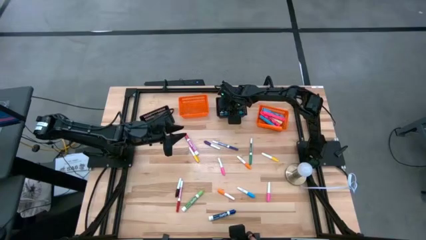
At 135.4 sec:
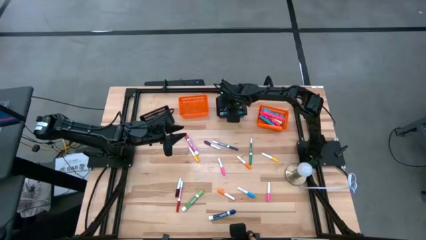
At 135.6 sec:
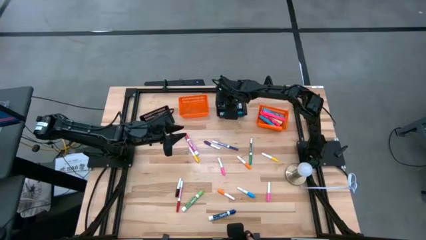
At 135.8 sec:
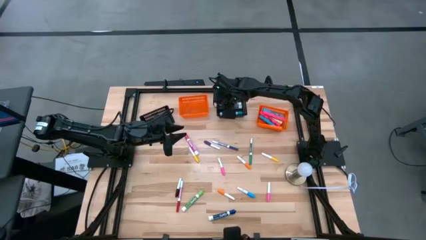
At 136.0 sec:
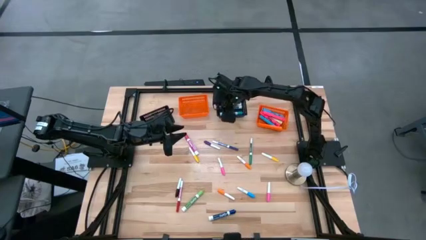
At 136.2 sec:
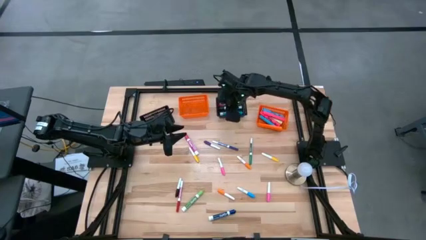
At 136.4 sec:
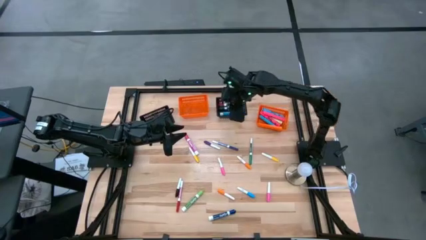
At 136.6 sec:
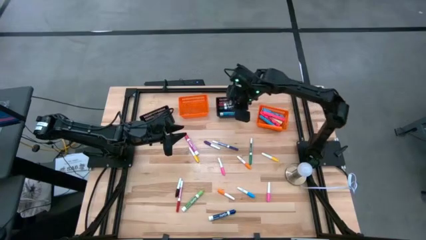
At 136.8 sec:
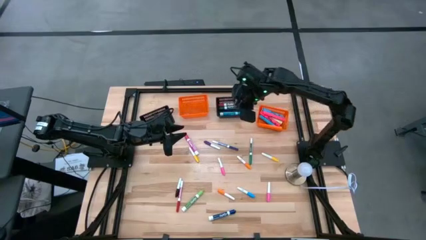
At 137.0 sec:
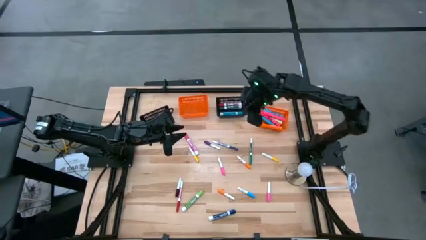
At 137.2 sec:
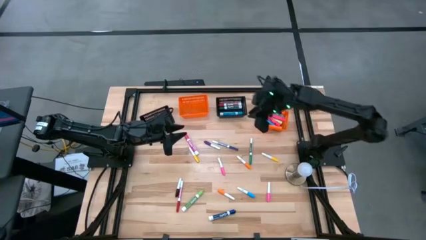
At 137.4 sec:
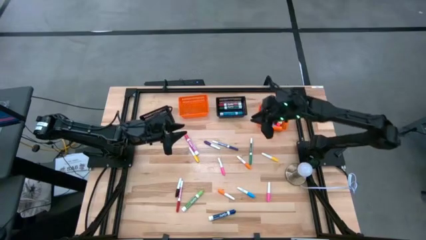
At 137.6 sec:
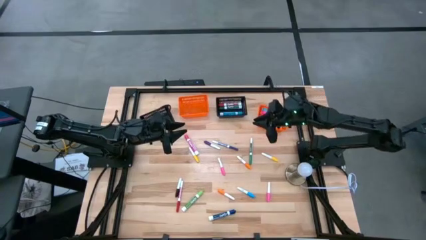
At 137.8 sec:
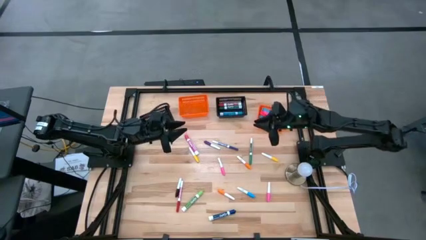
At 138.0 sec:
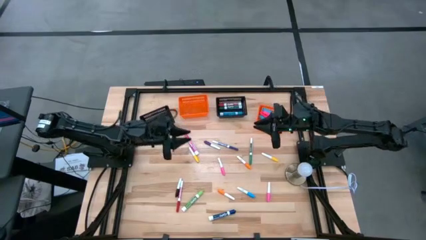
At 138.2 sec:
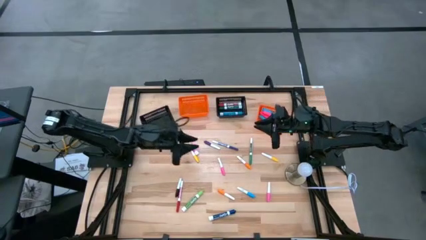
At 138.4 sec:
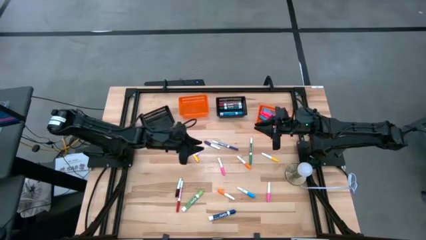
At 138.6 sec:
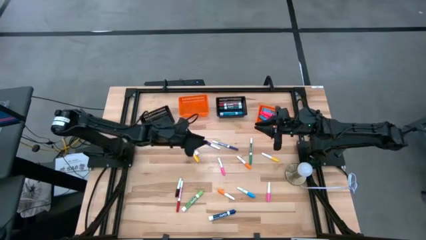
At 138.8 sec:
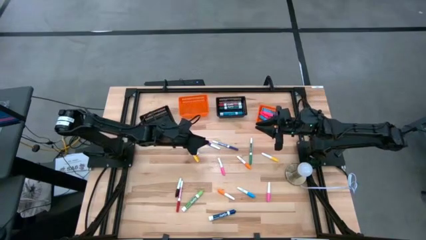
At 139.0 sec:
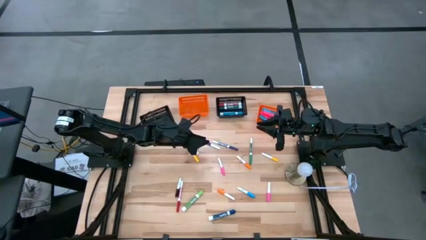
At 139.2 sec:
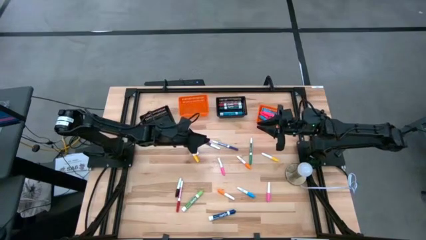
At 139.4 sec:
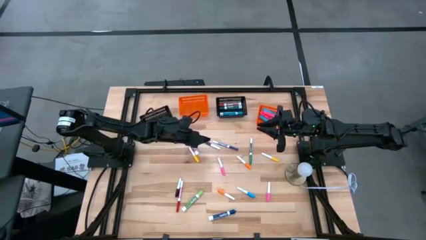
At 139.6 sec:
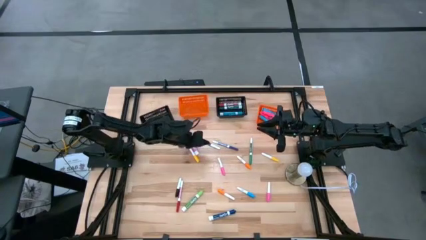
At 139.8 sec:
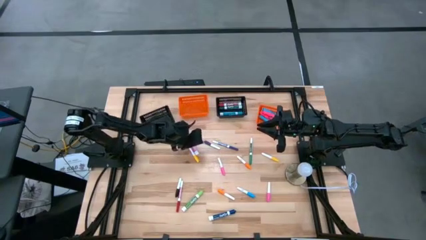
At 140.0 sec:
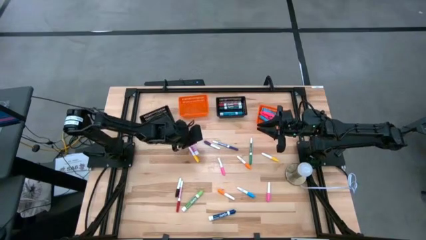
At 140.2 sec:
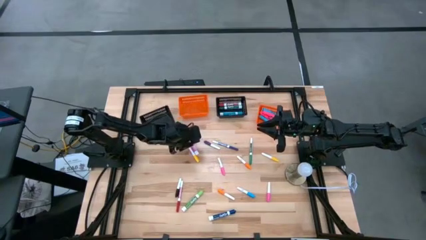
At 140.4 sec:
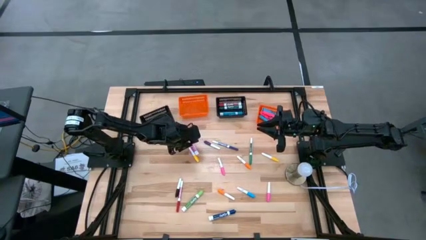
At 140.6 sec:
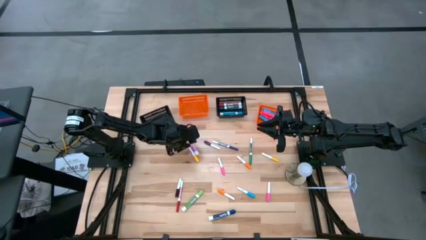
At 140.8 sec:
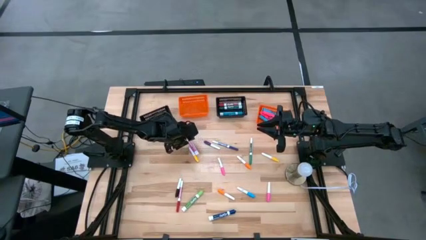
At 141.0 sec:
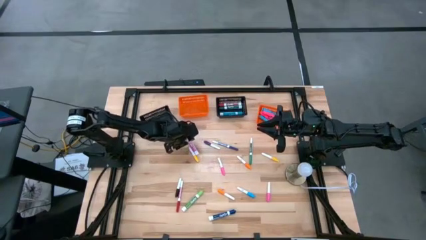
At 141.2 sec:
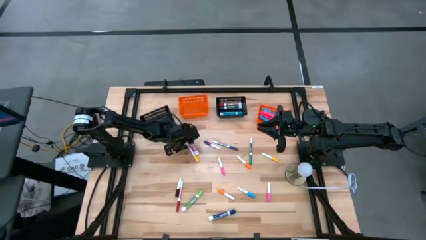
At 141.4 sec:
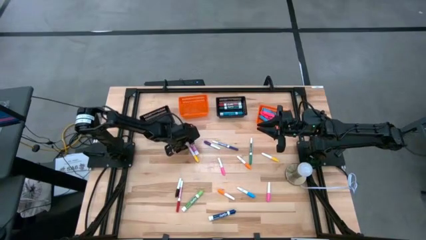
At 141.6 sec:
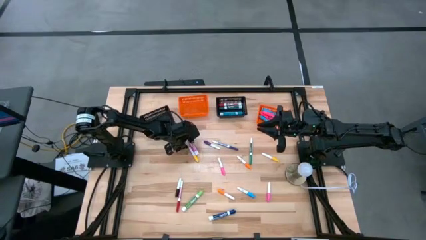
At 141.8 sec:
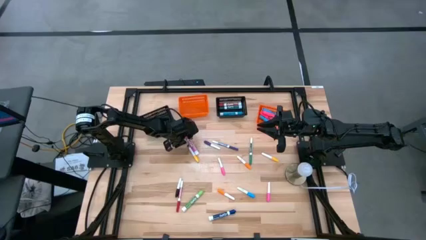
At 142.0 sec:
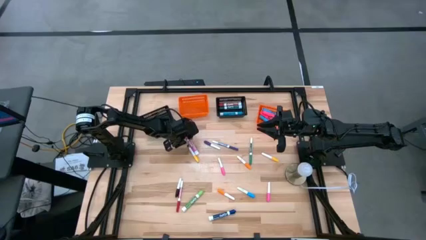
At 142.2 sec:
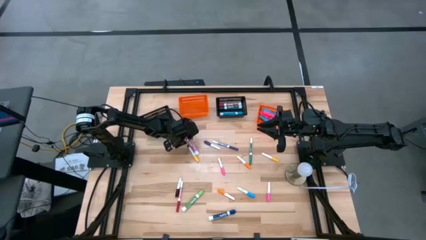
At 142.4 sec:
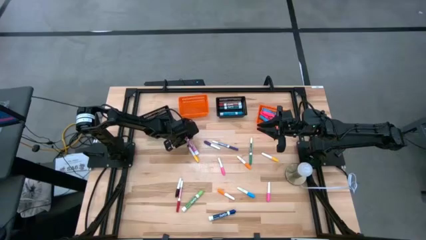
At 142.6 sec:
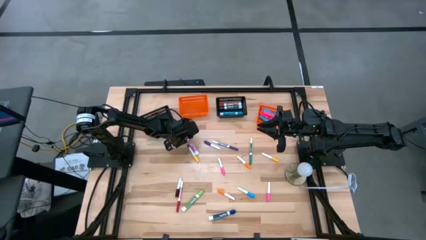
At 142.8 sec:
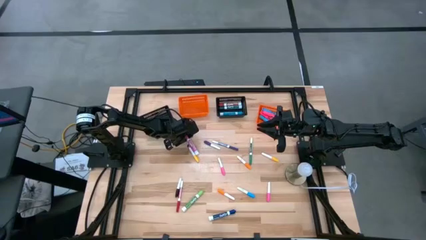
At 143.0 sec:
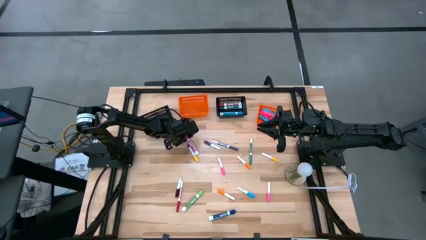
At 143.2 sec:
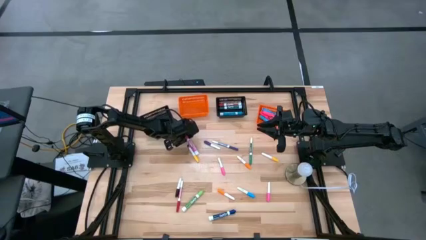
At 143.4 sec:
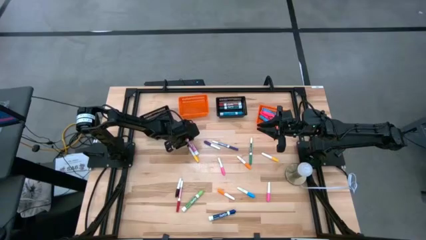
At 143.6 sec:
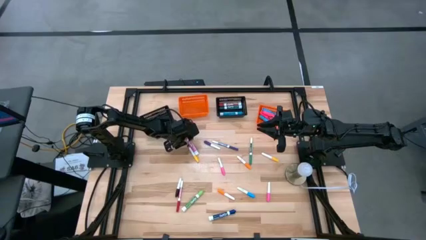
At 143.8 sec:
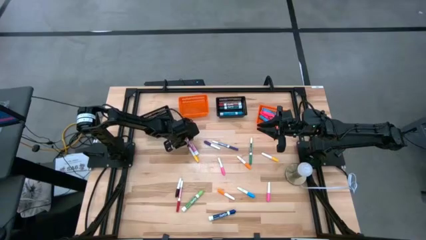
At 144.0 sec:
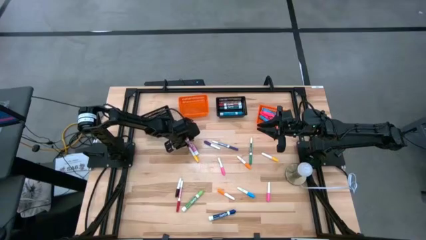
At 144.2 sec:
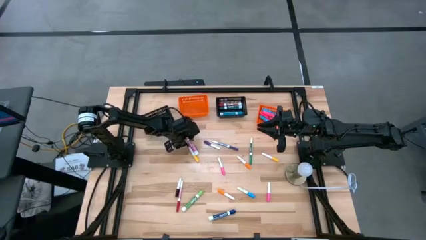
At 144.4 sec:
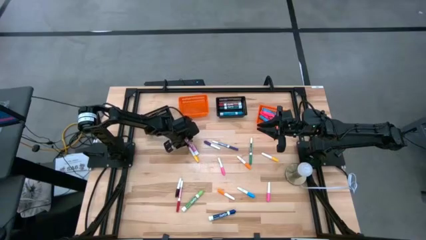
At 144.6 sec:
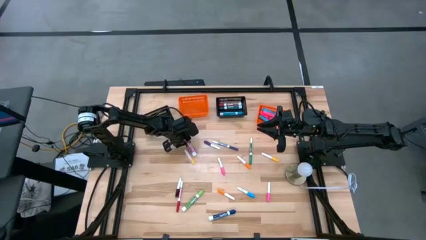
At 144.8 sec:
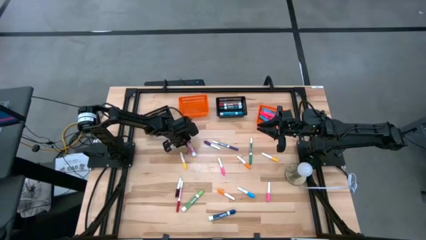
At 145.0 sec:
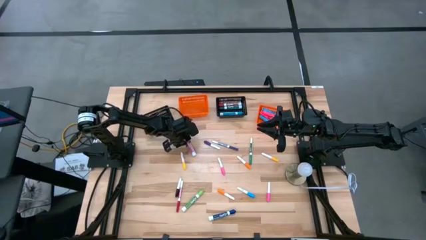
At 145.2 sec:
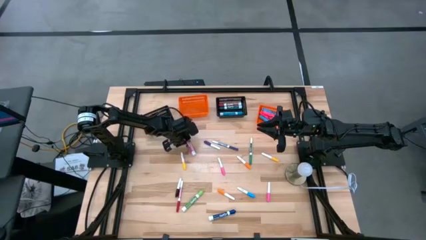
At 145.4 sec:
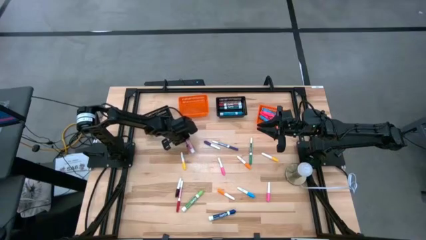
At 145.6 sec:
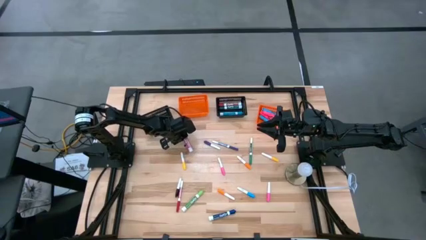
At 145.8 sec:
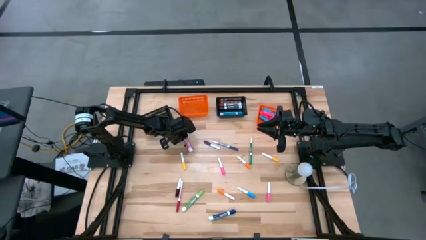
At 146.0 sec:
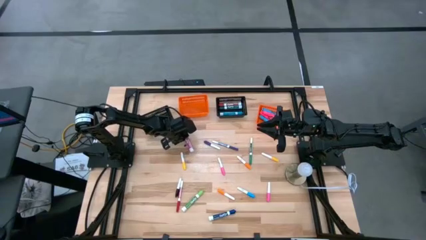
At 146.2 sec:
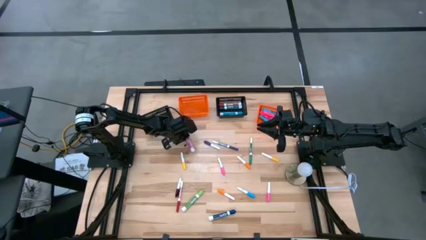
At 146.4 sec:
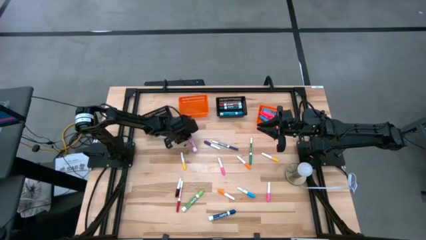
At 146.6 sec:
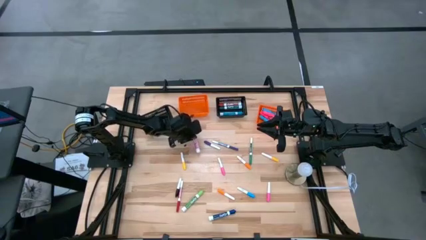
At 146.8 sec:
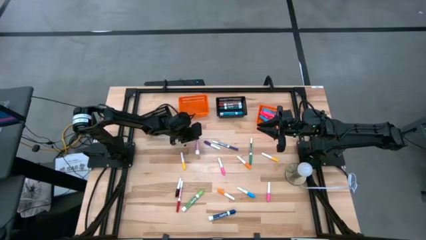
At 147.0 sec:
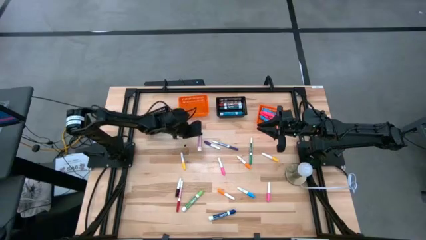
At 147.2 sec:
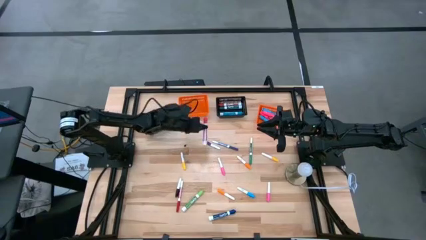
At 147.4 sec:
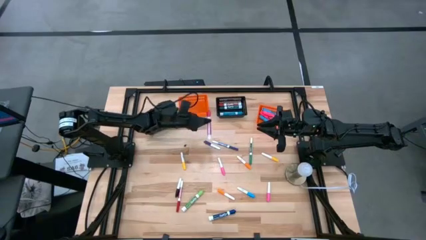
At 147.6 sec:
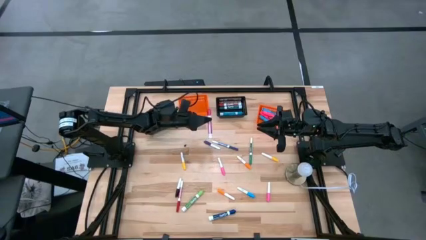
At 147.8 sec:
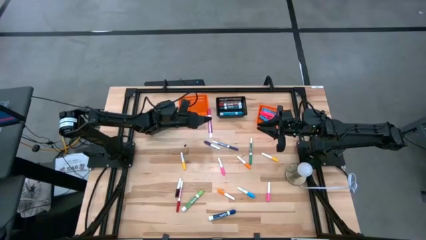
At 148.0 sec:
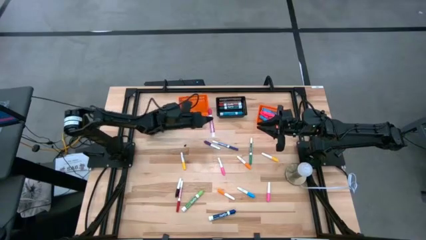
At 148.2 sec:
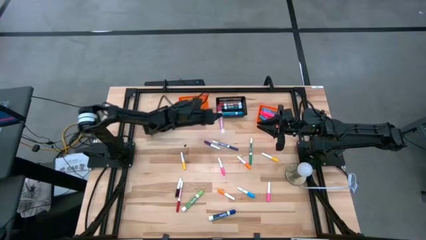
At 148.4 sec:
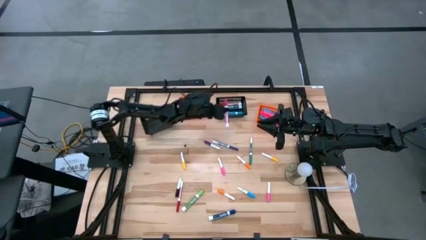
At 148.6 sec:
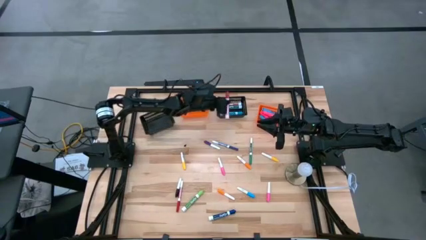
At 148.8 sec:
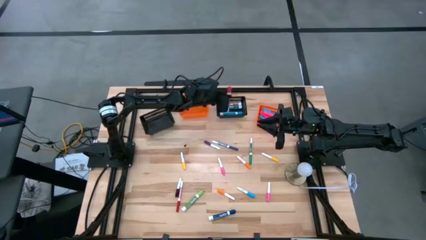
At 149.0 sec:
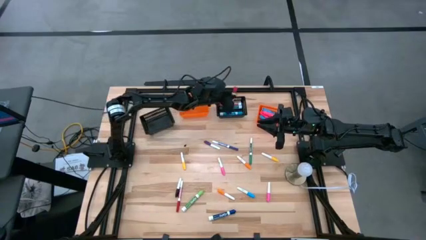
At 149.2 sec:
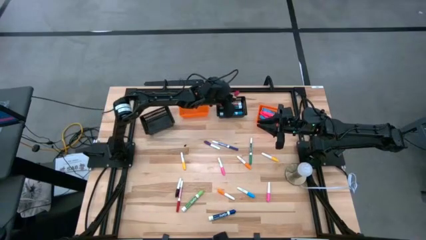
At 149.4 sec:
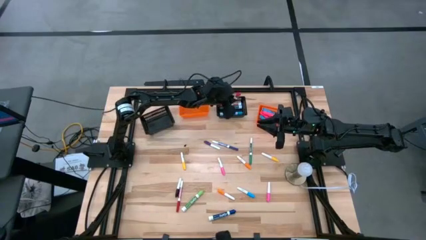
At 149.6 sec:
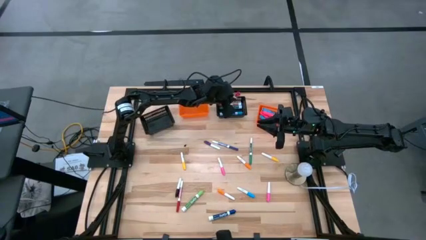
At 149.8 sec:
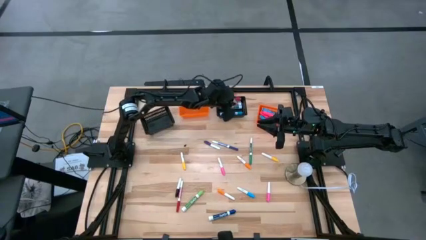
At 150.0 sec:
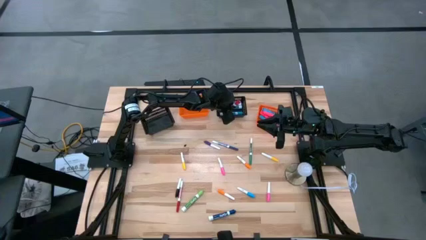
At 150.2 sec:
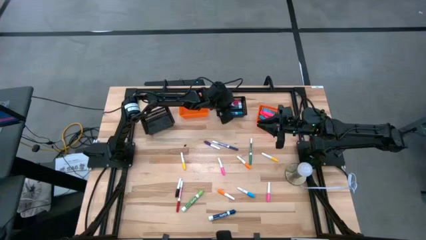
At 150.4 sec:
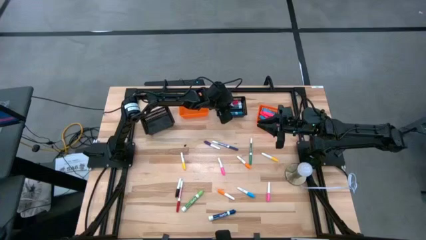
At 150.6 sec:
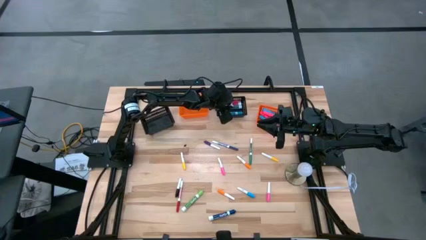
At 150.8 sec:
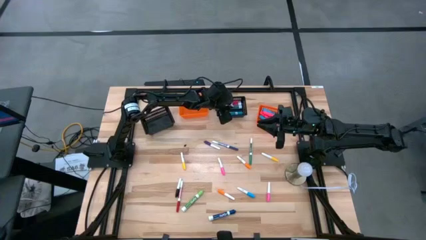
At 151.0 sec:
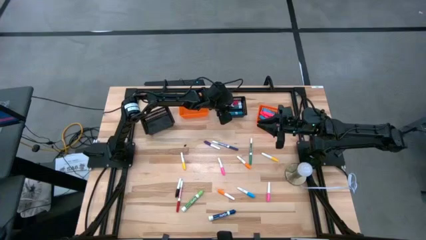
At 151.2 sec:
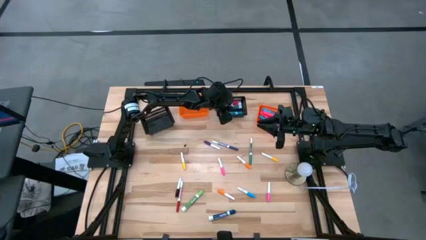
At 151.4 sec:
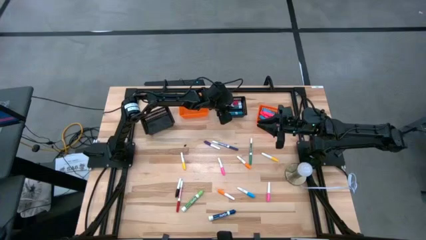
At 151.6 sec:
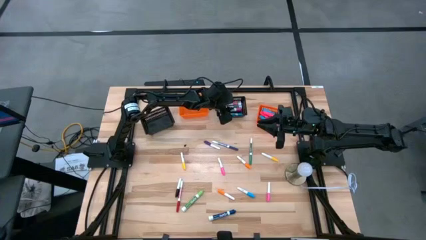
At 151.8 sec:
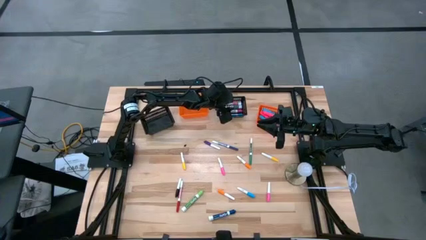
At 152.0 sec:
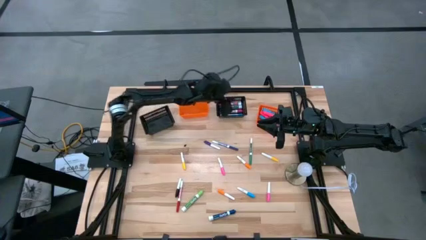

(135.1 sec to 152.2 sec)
Task: Pick & Place Markers
Put the top white red marker into the middle black bin

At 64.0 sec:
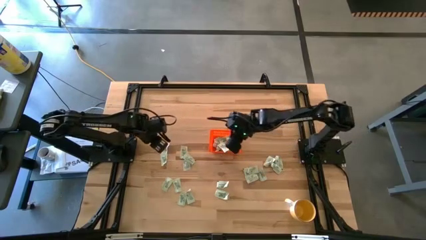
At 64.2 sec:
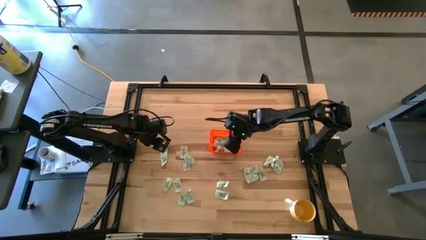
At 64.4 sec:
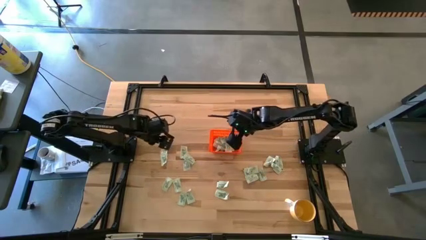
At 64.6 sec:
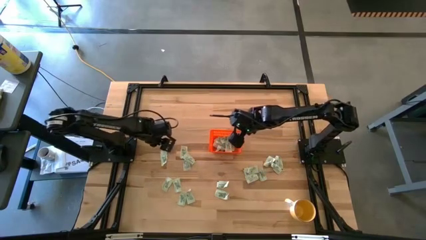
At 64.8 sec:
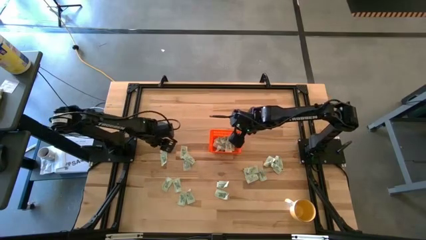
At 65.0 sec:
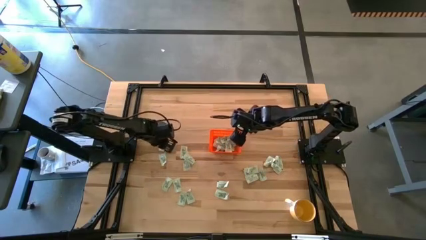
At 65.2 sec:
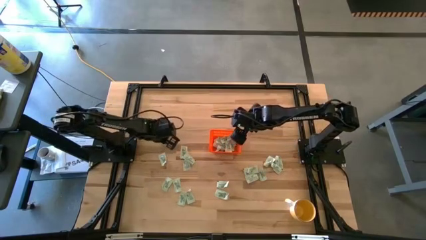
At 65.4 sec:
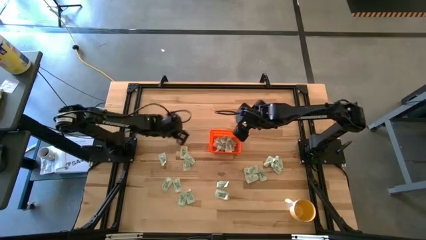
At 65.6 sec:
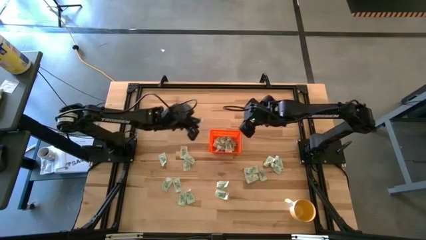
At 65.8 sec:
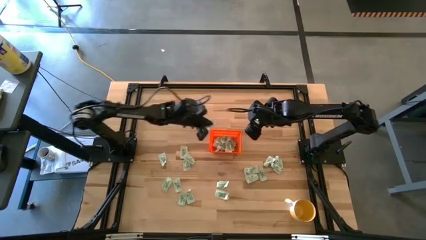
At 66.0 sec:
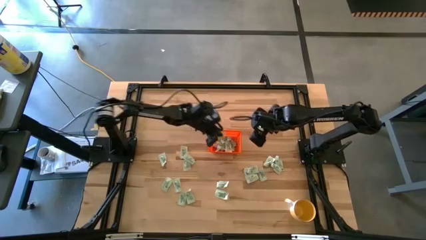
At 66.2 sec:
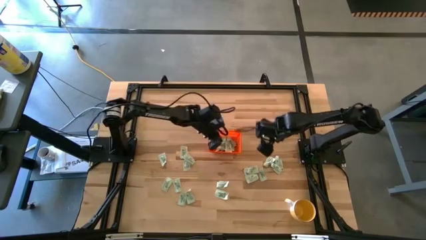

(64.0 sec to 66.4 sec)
Task: Pick and place Stevia / Truvia into bins
Put the light green stevia packet into the orange basket
